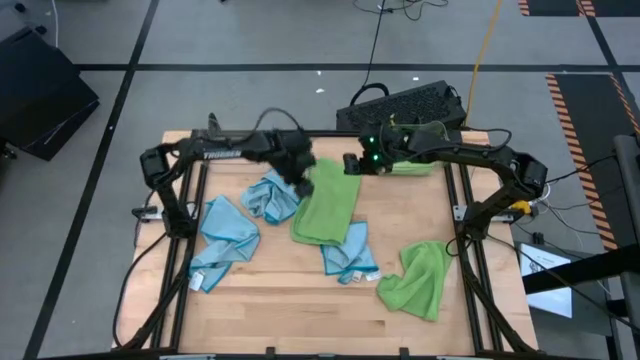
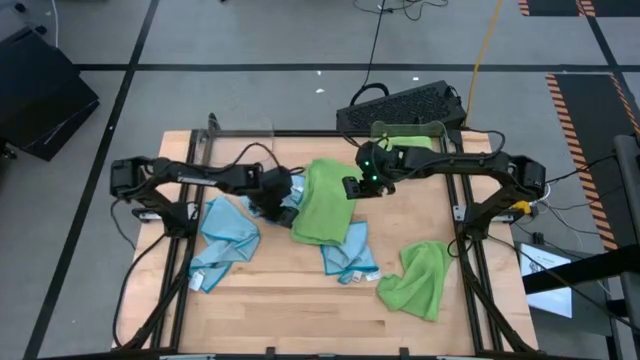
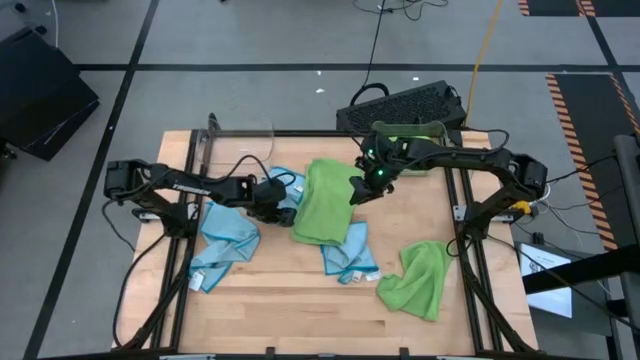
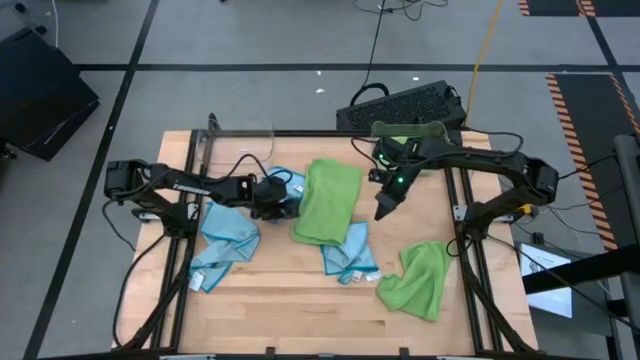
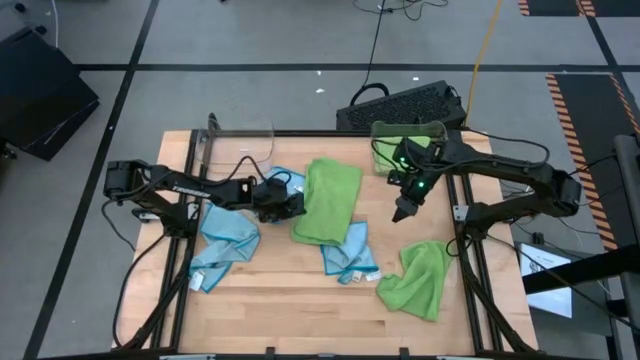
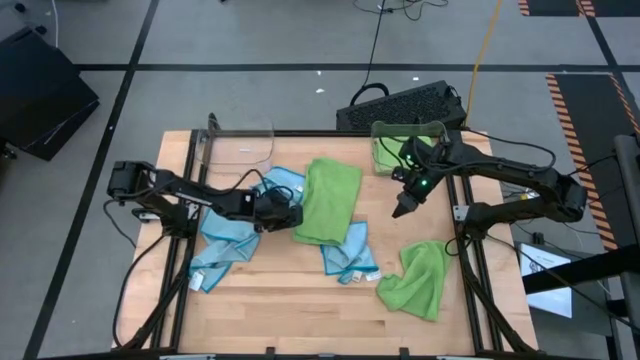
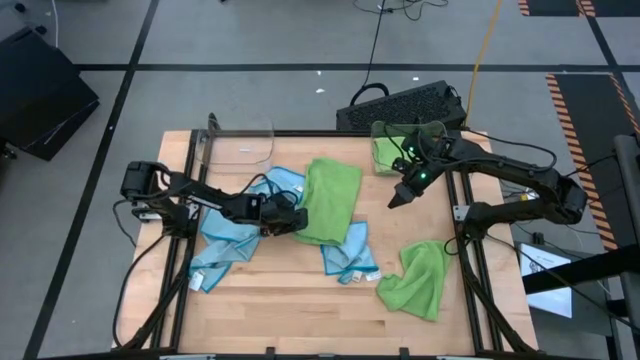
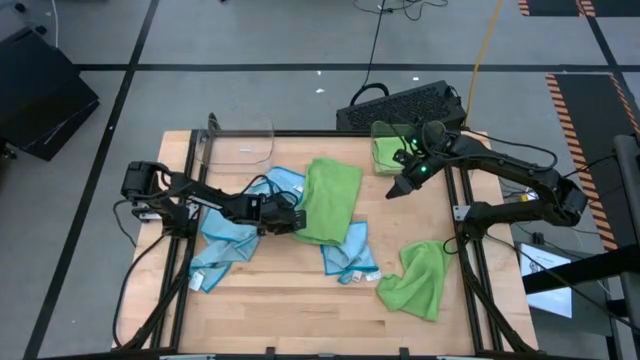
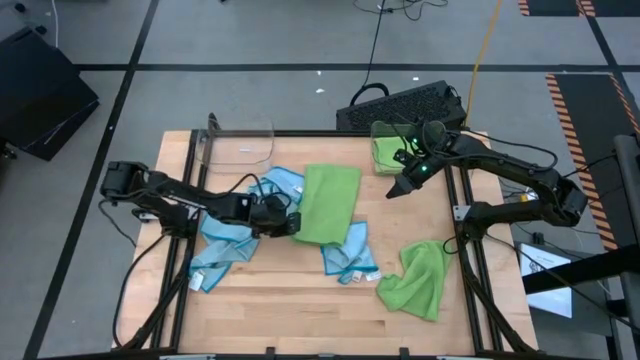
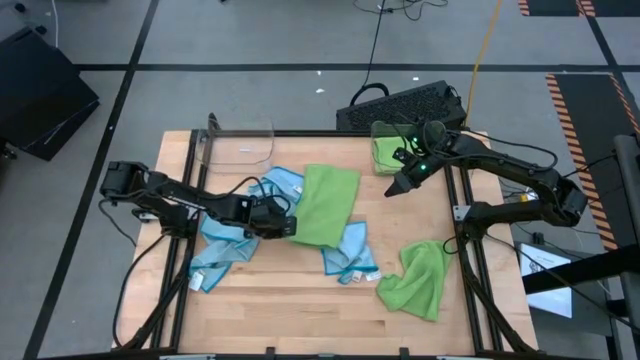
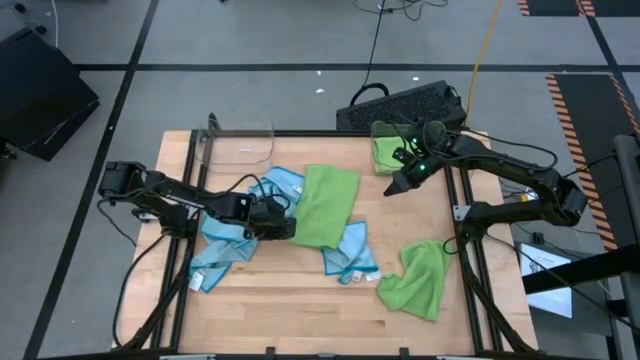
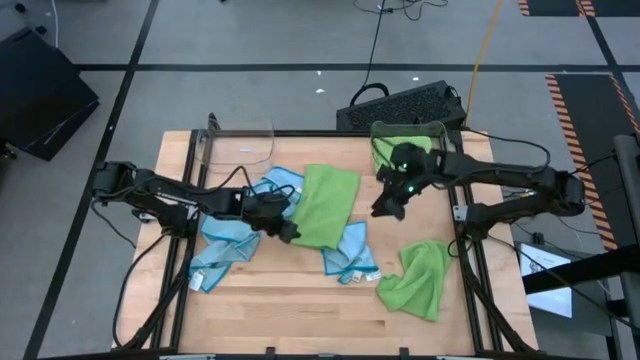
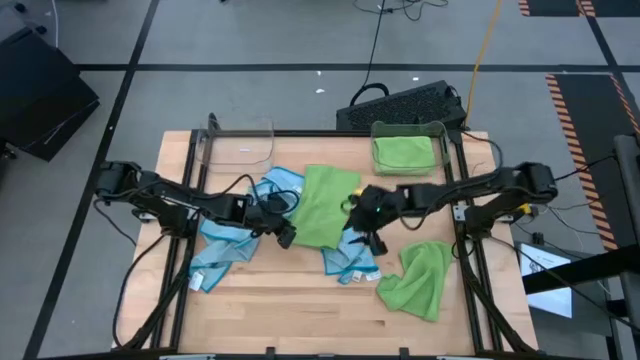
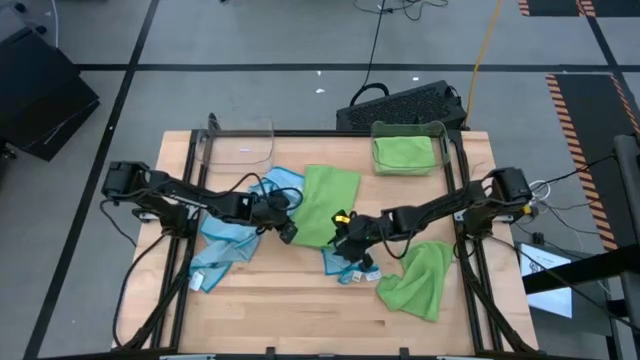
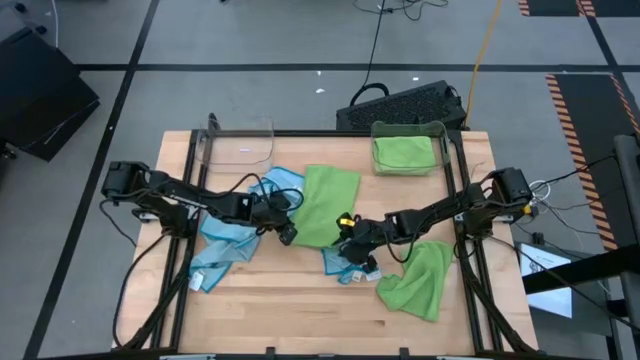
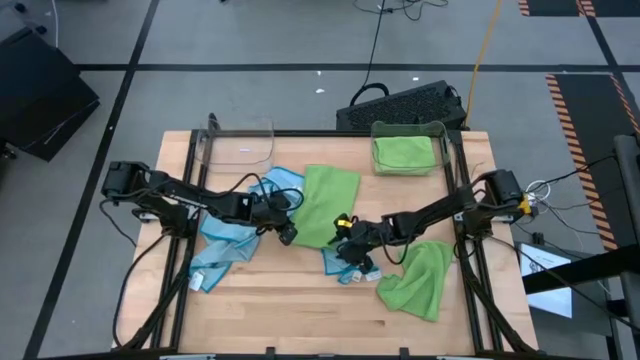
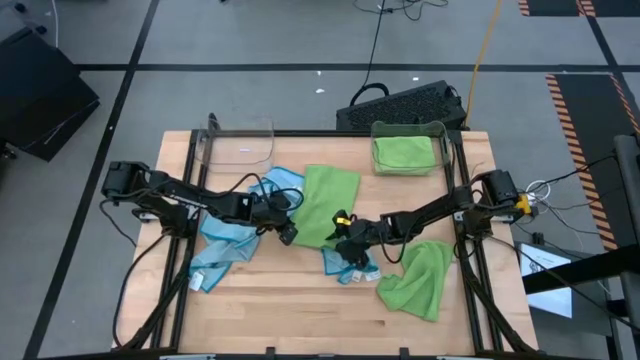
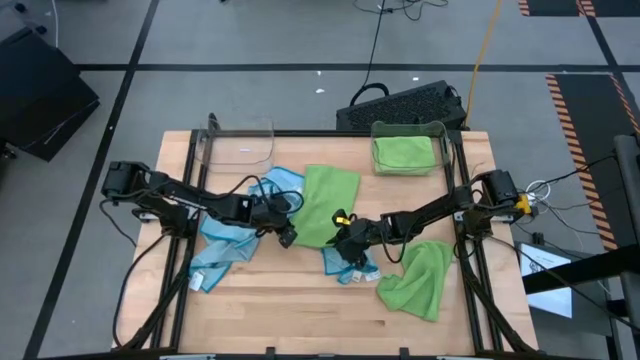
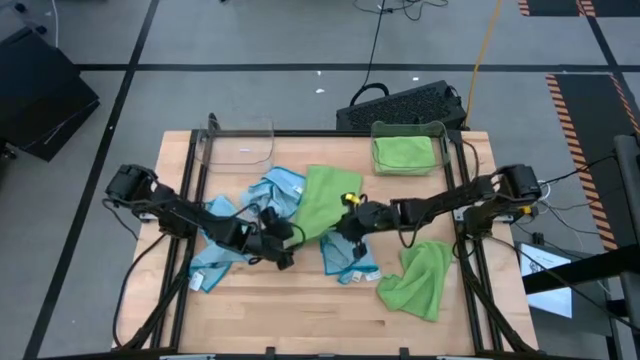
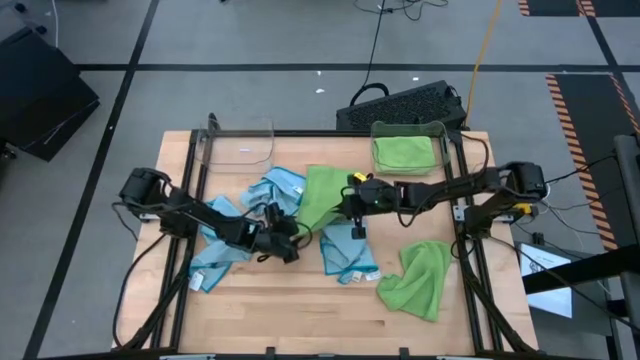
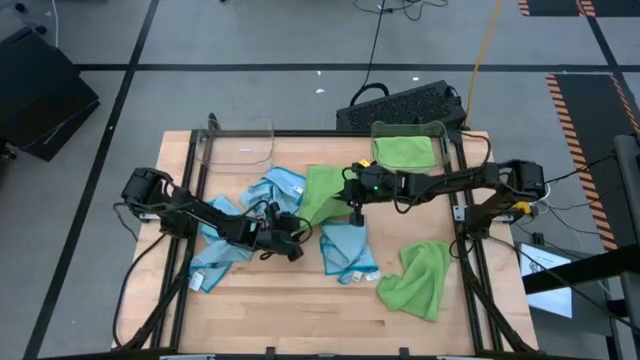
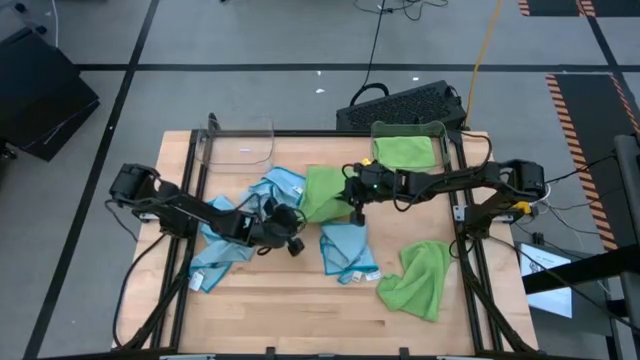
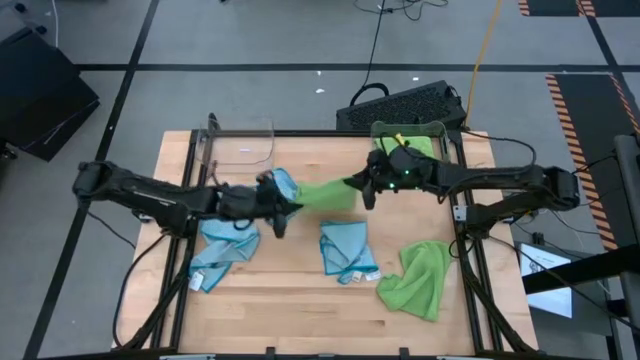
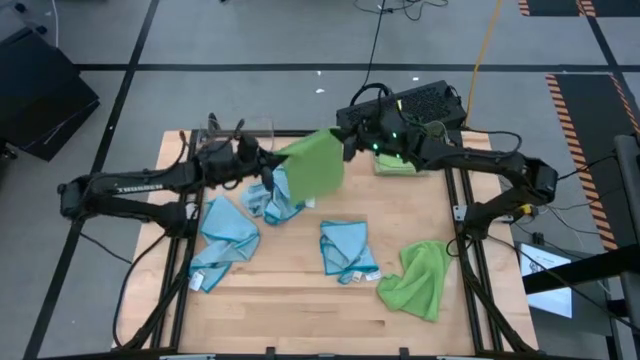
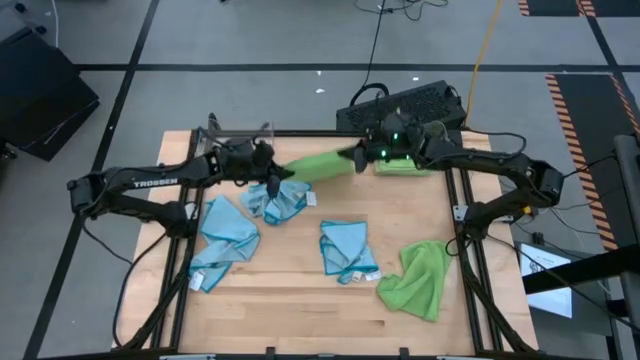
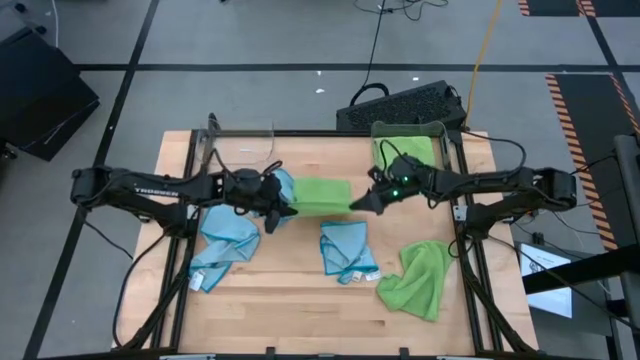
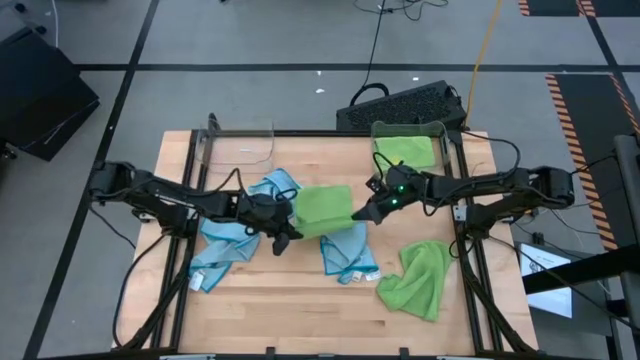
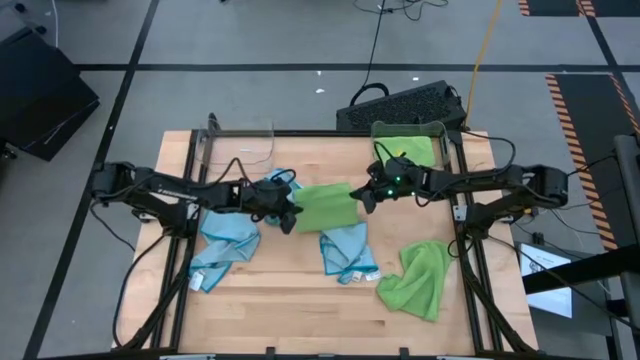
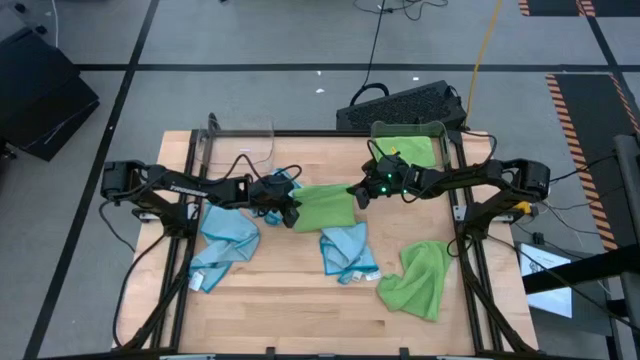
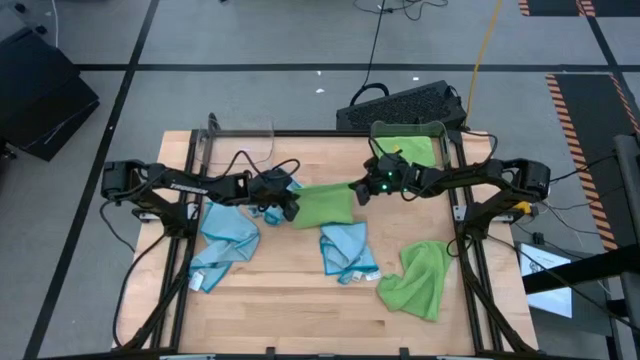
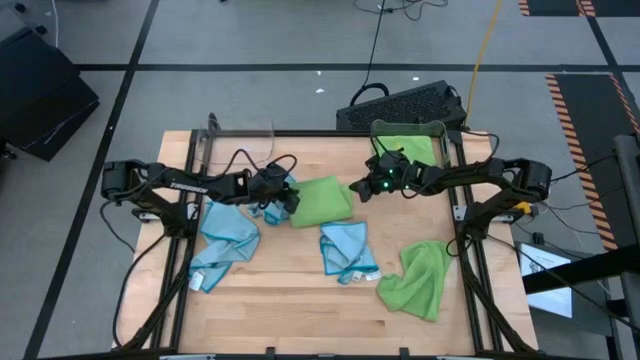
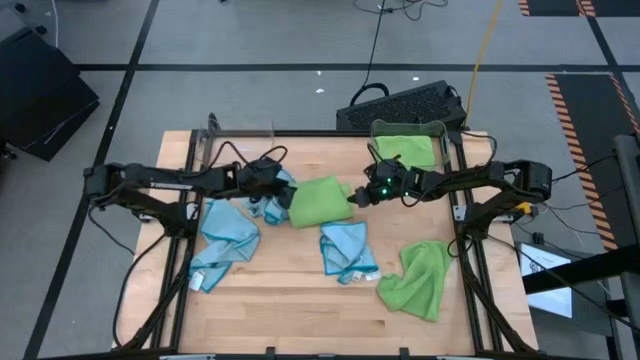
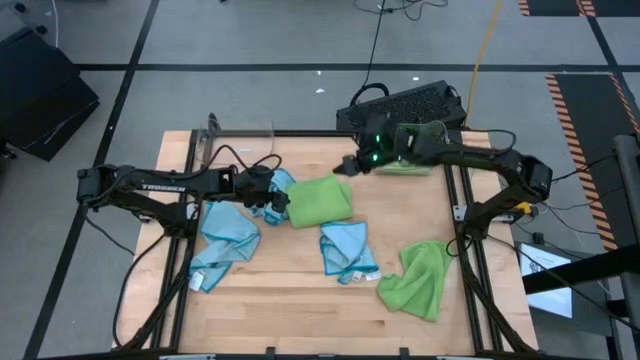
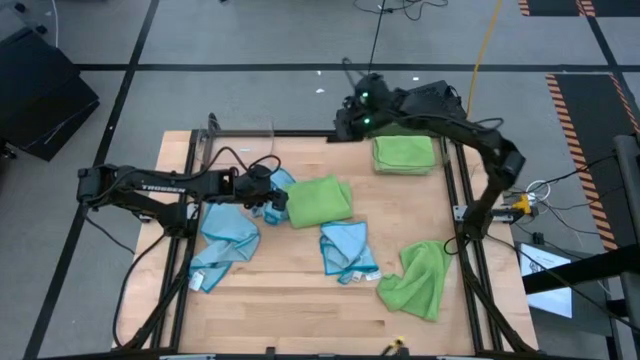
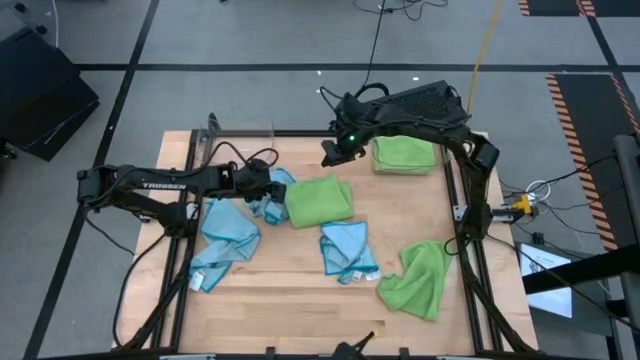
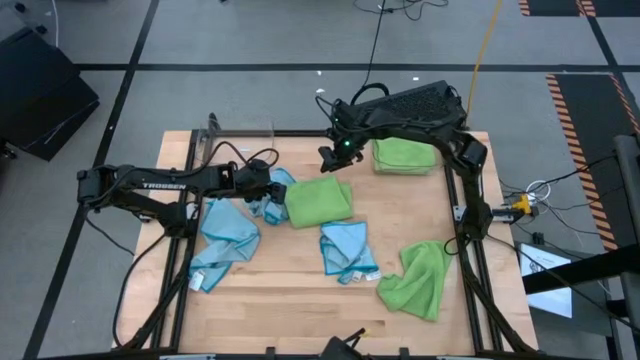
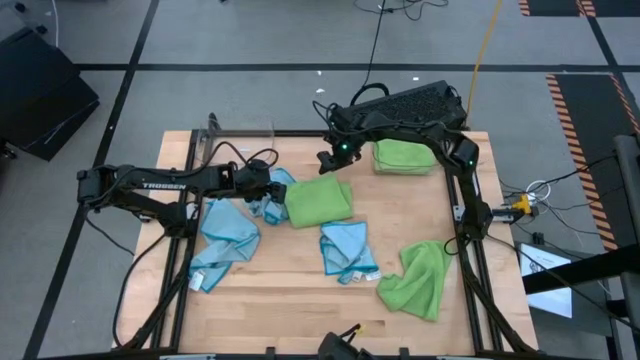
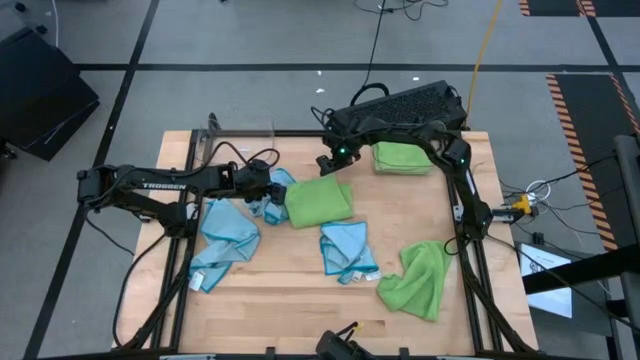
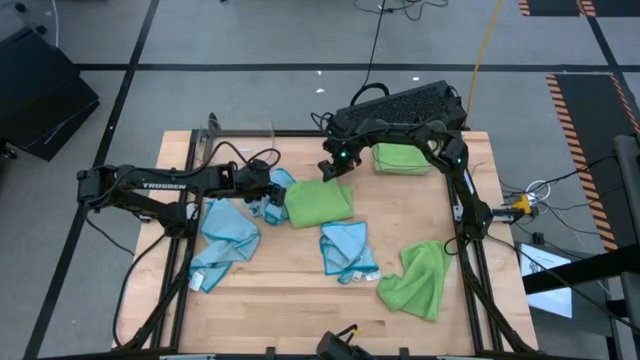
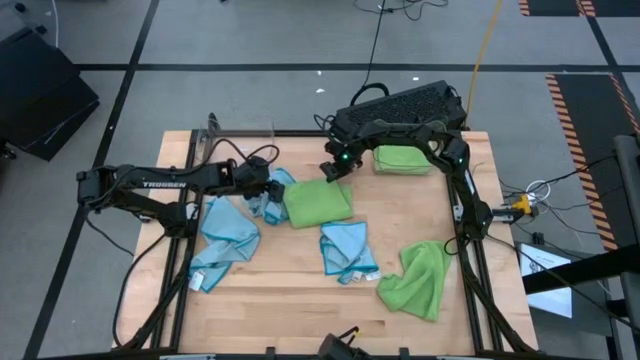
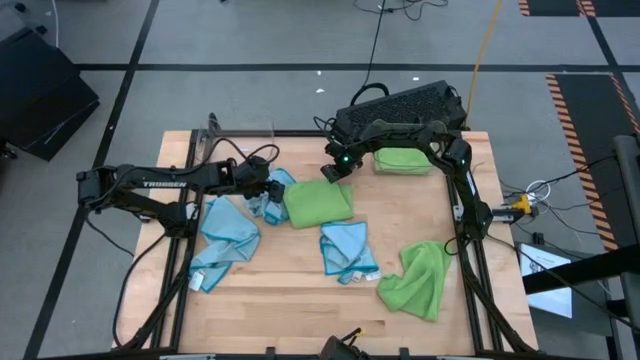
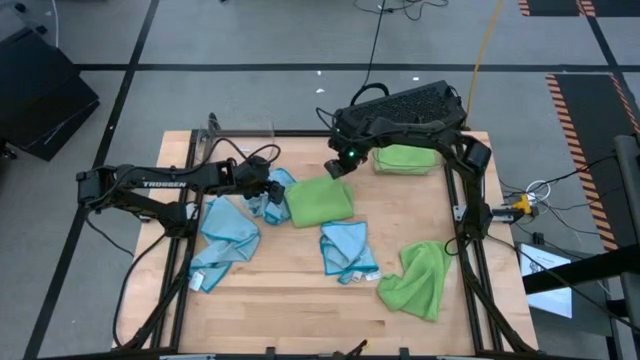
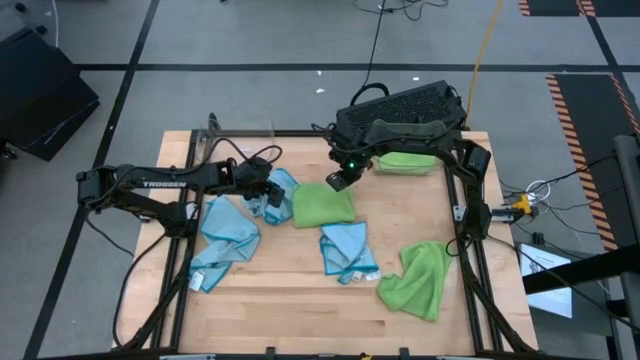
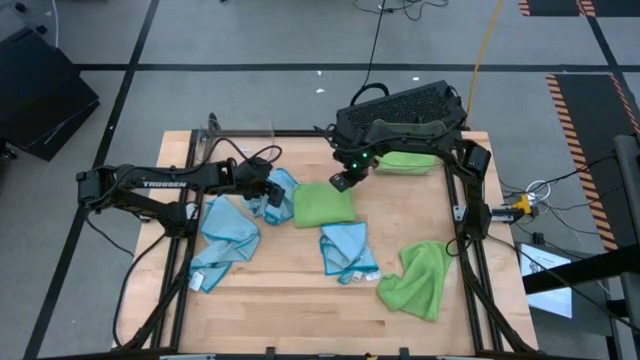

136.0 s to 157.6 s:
Task: Sort microfiber towel by color & place in baskets
Fold the left green towel
